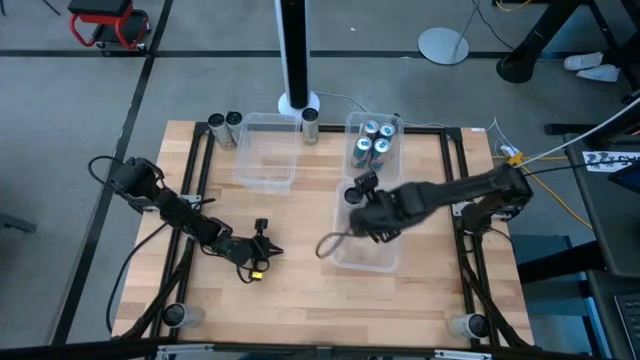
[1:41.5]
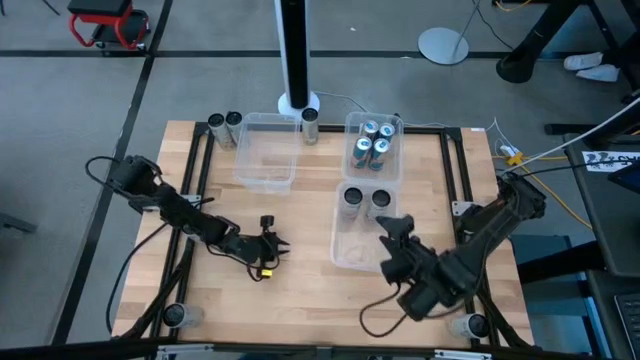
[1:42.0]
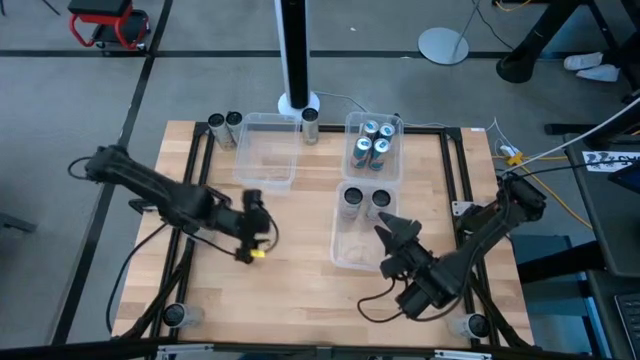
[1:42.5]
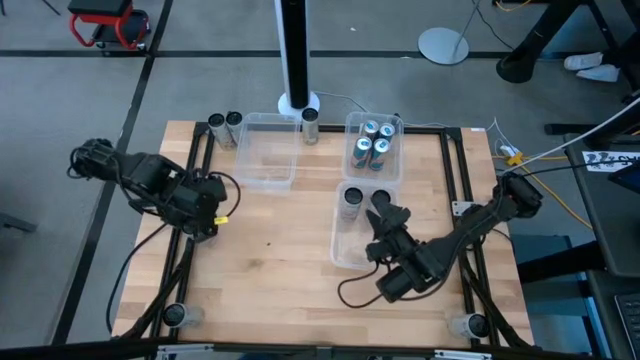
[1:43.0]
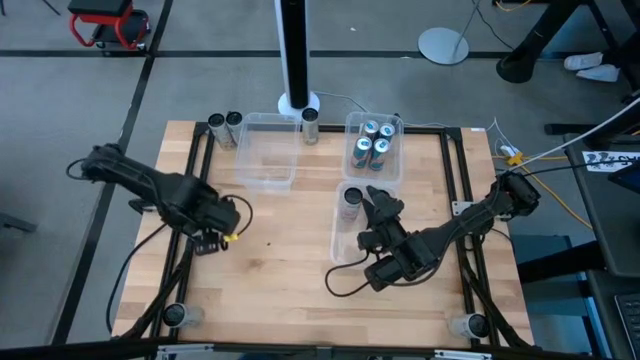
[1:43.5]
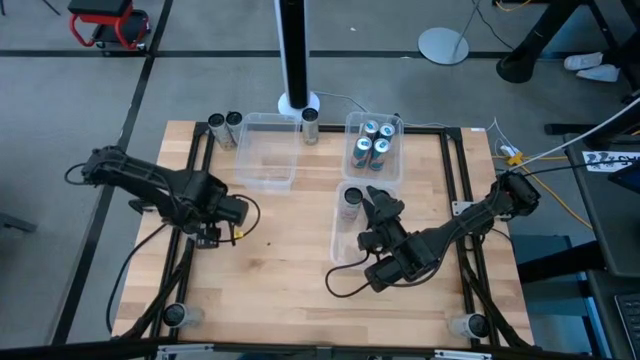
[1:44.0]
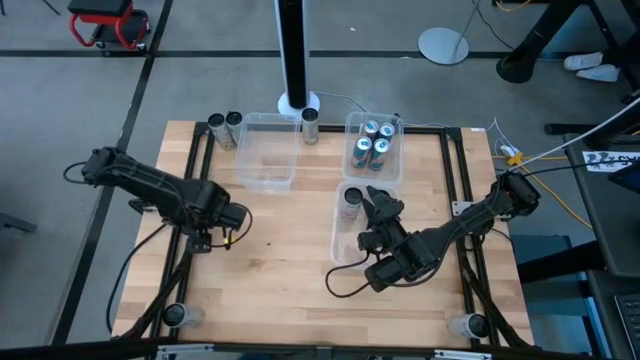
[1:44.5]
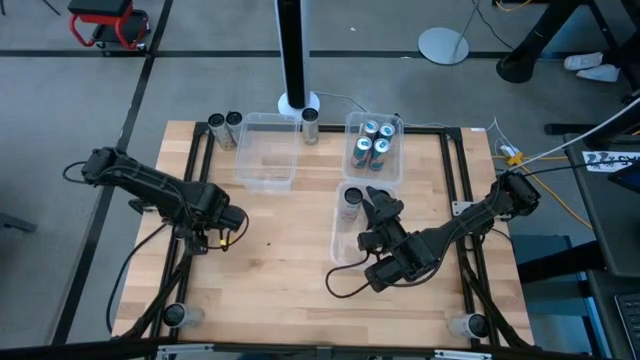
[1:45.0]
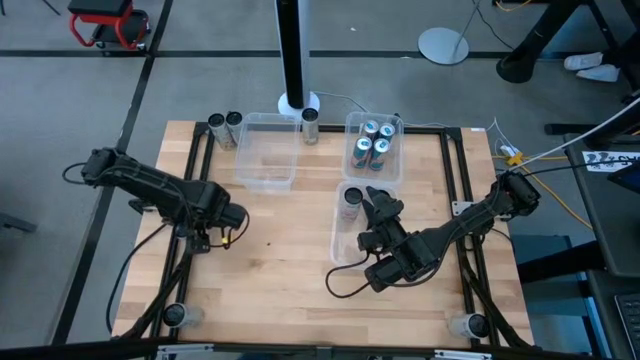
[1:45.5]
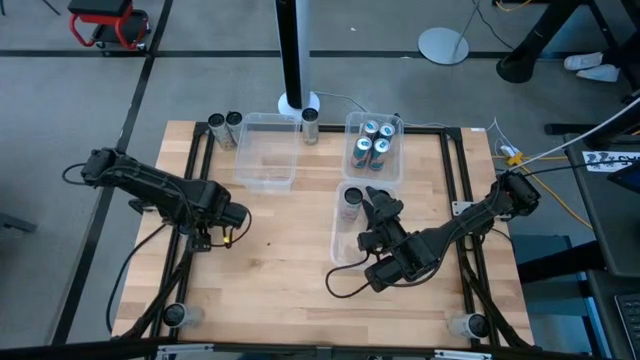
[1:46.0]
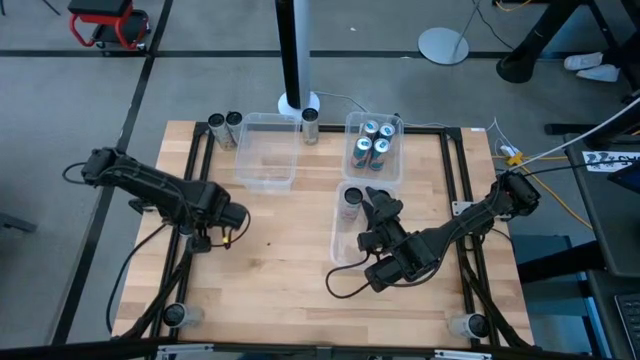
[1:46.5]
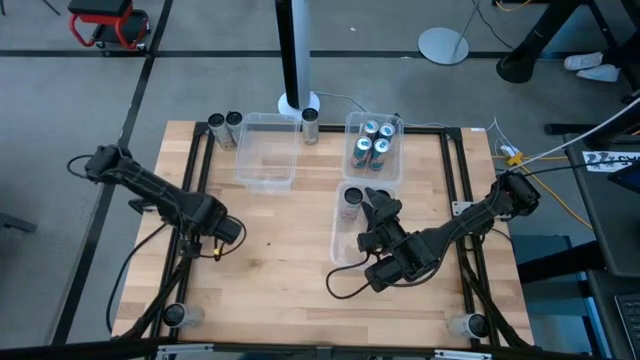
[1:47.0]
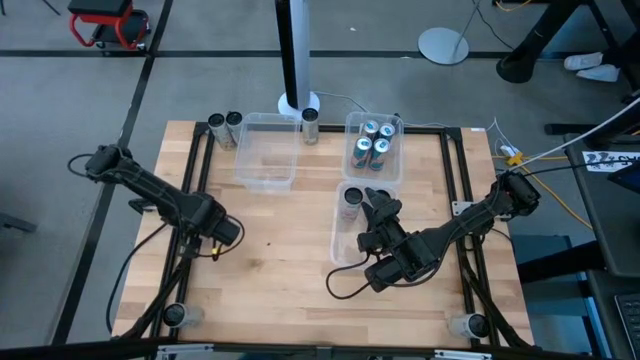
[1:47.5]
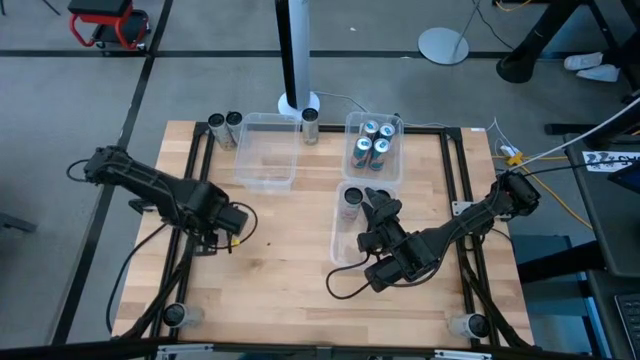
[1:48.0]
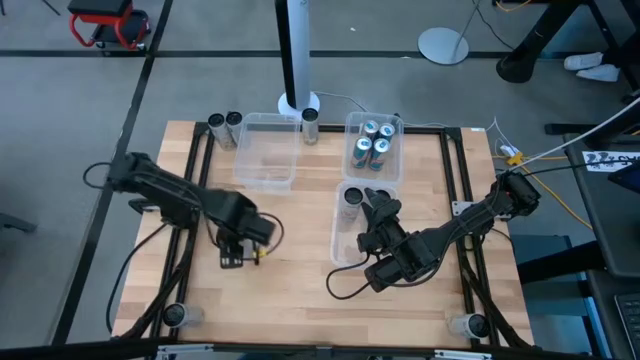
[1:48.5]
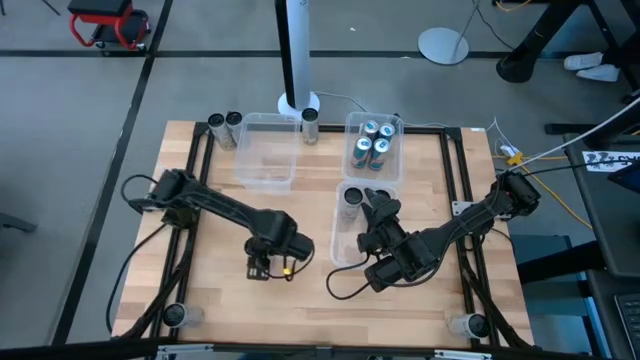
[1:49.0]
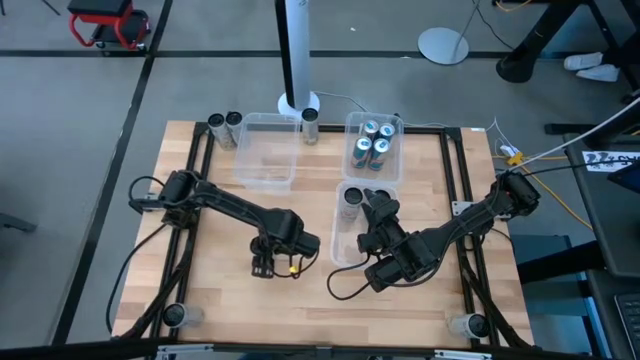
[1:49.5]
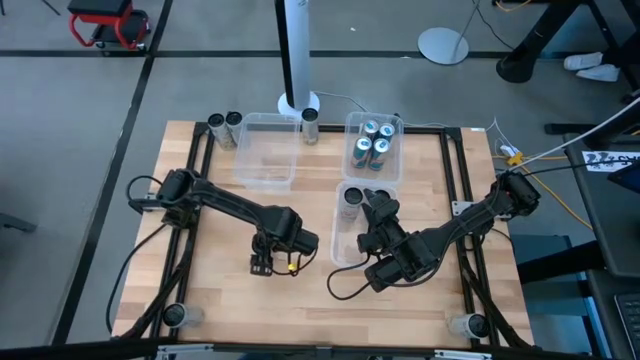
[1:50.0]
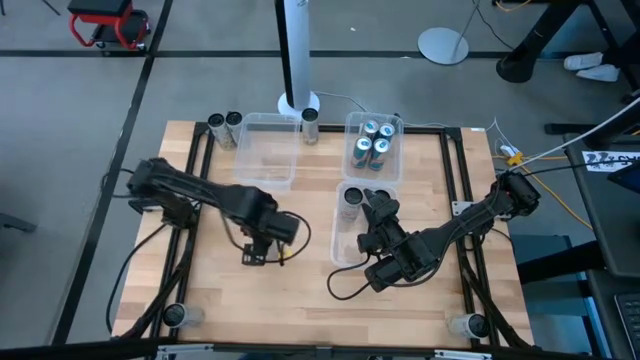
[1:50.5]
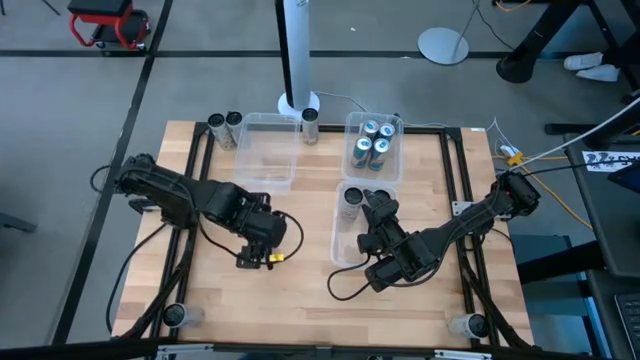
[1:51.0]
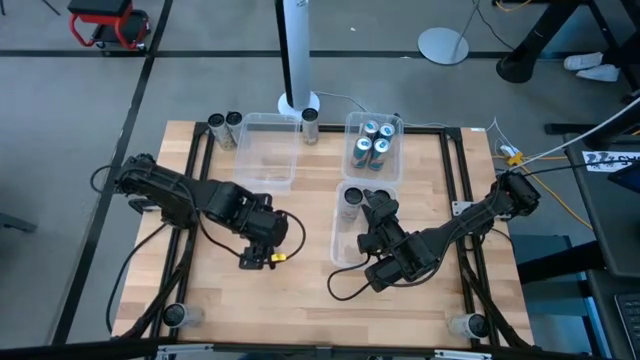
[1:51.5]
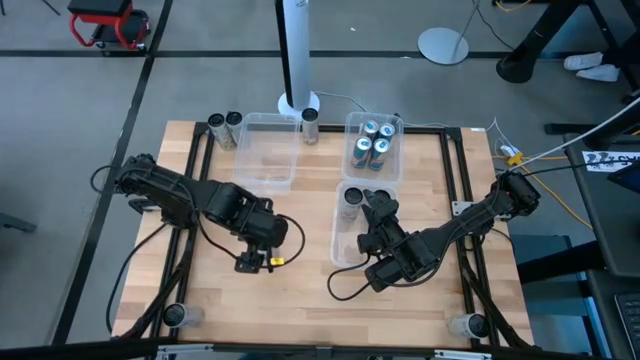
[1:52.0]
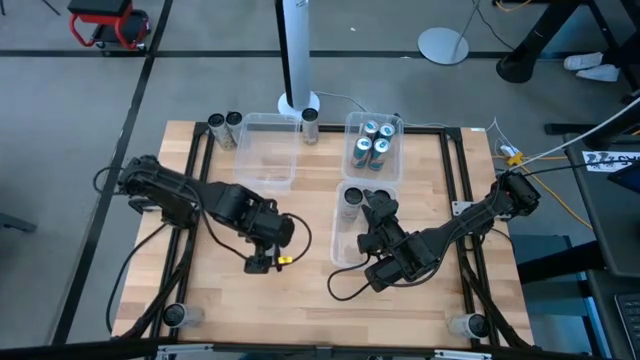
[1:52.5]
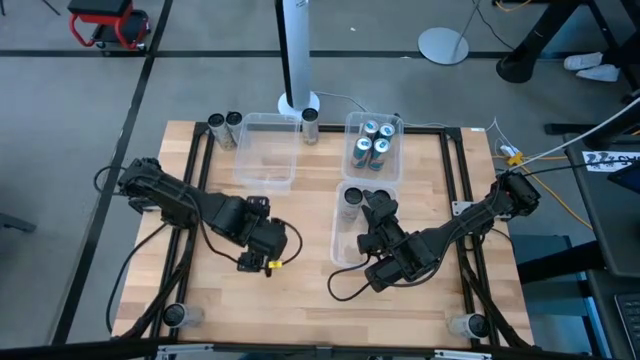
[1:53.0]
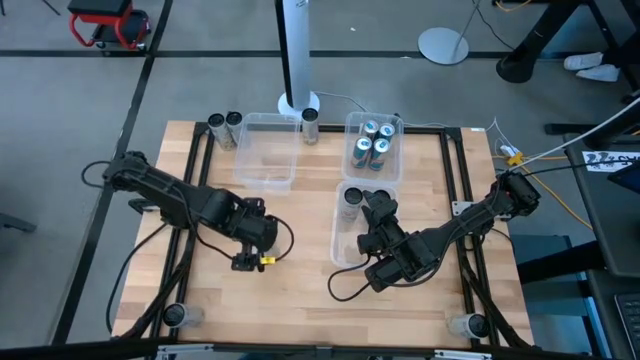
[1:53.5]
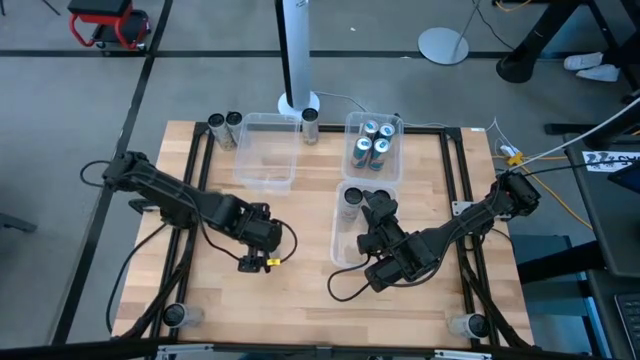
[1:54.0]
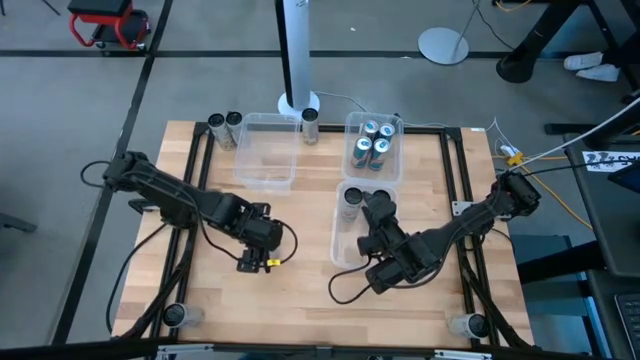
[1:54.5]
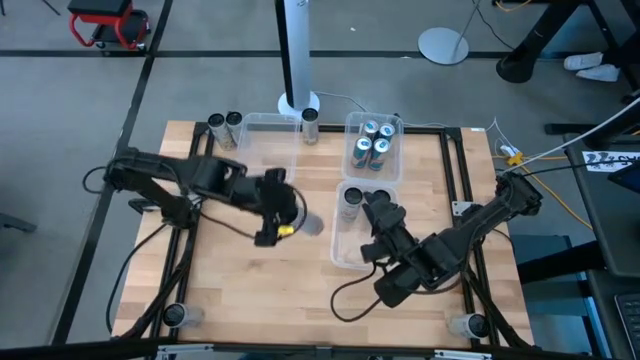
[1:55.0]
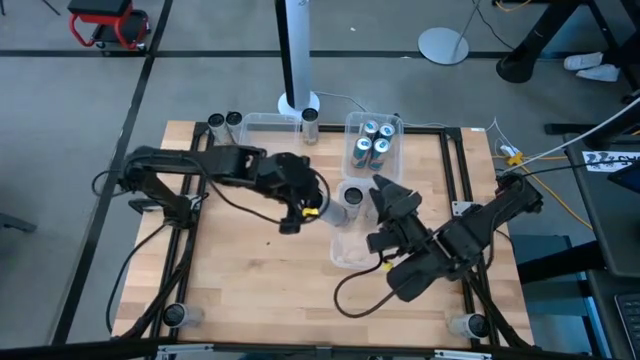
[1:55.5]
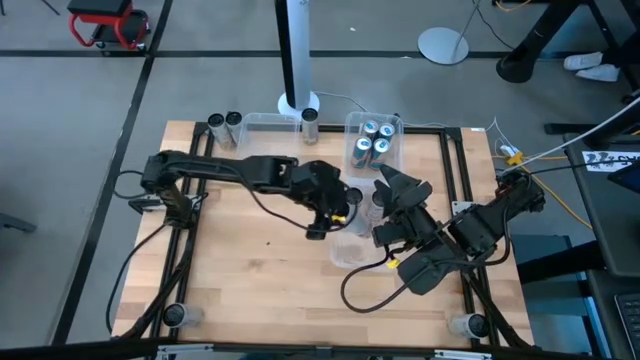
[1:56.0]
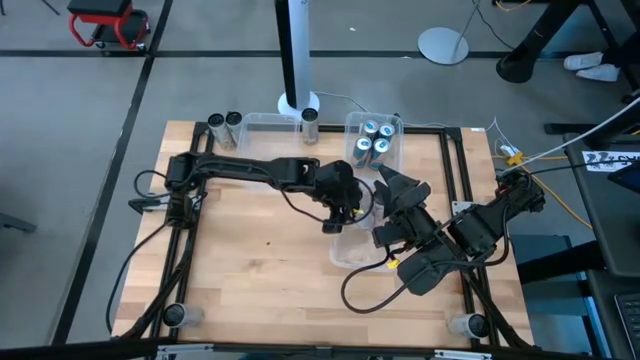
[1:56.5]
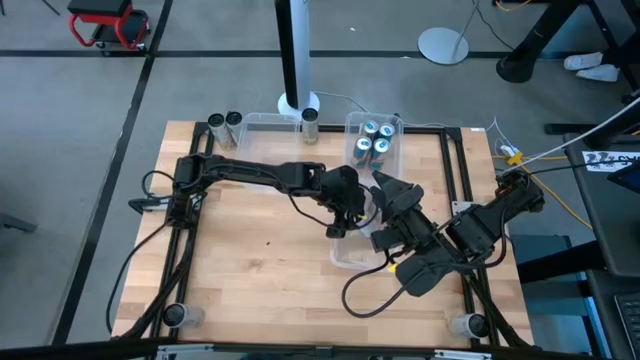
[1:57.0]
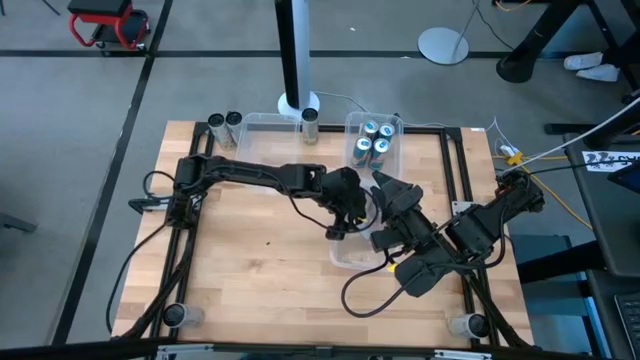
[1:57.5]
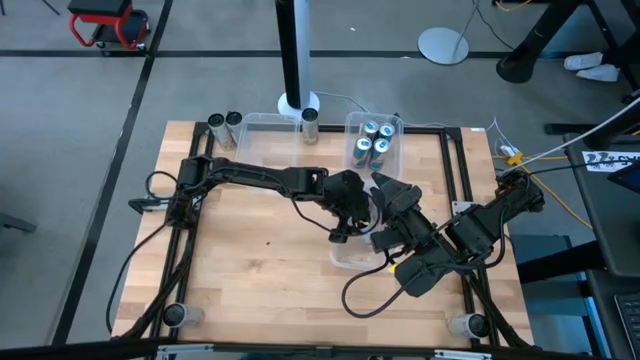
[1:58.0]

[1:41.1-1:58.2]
Task: Sort soda cans
Put the white pink soda can into the bottom right transparent bin

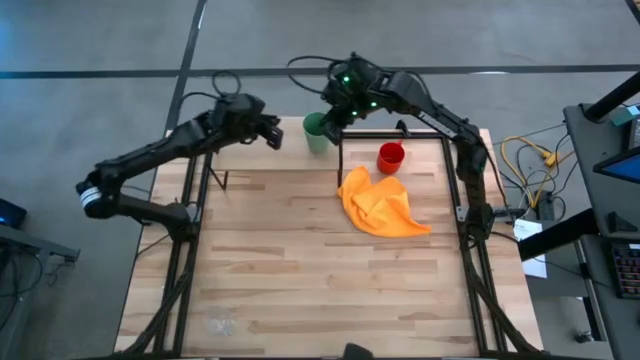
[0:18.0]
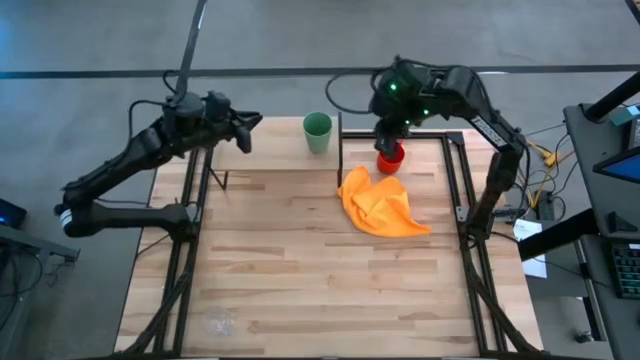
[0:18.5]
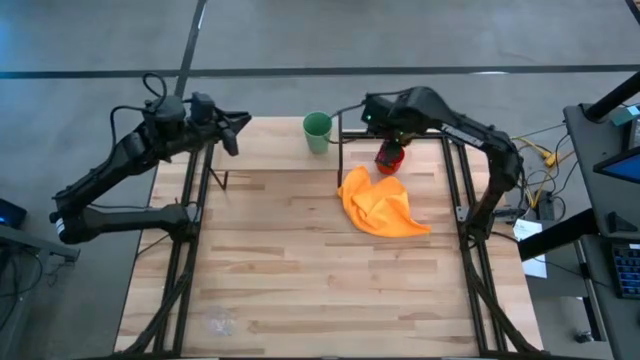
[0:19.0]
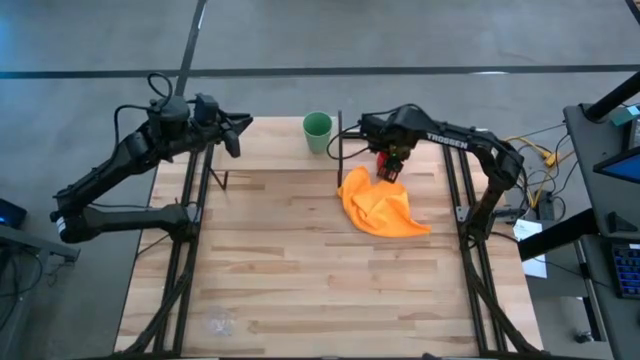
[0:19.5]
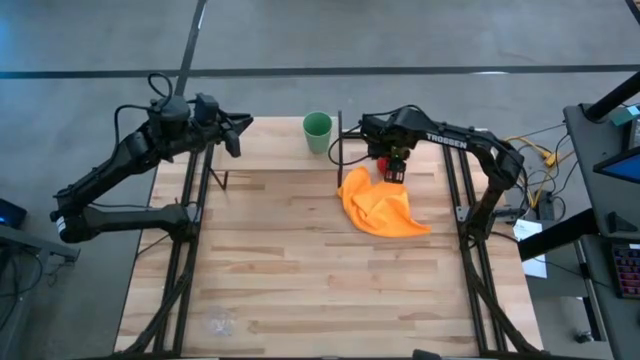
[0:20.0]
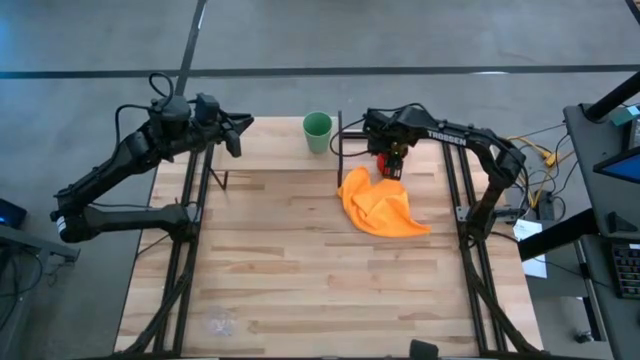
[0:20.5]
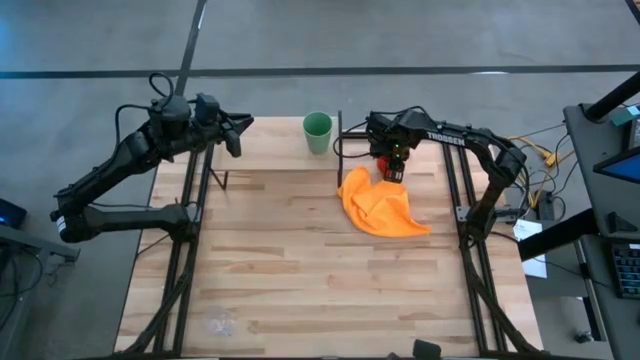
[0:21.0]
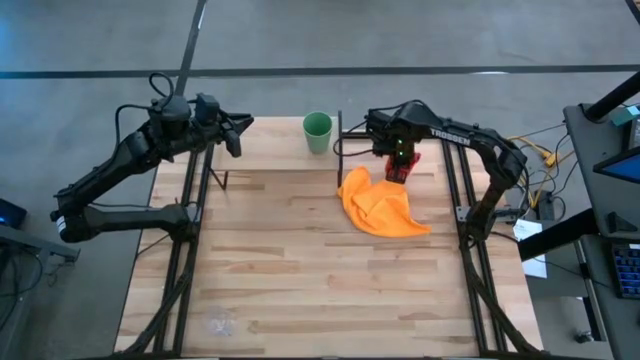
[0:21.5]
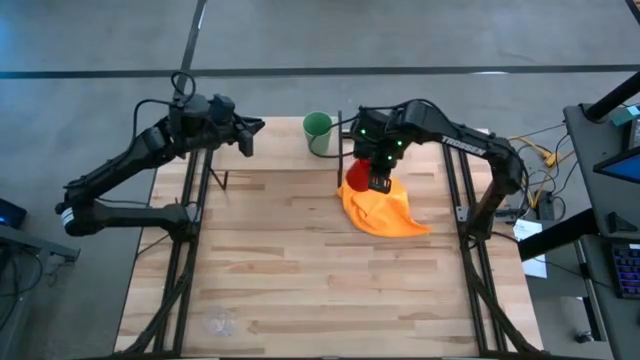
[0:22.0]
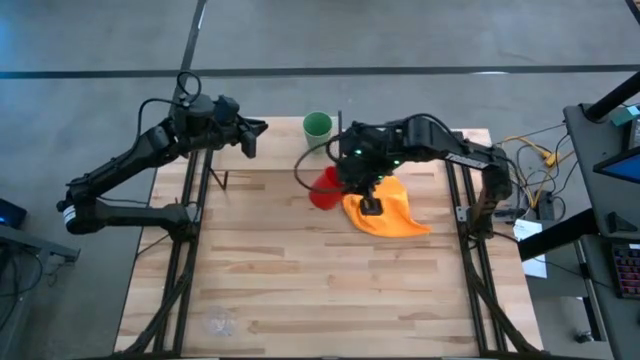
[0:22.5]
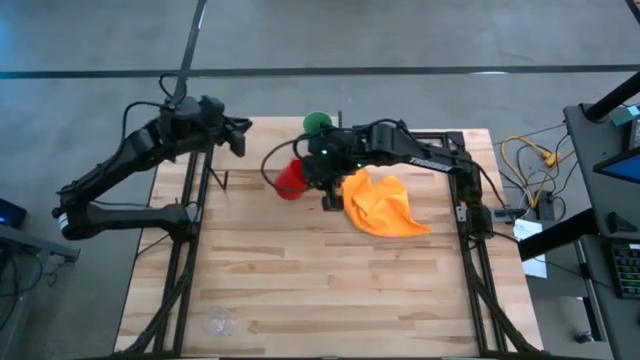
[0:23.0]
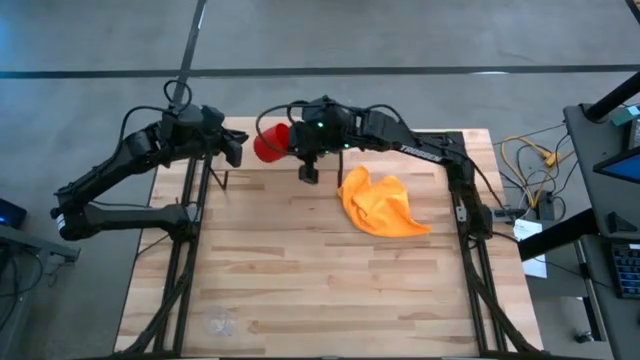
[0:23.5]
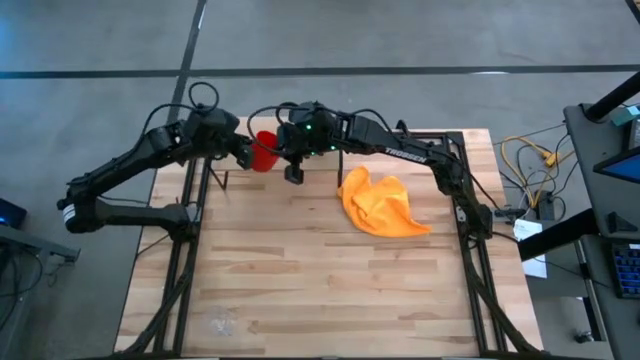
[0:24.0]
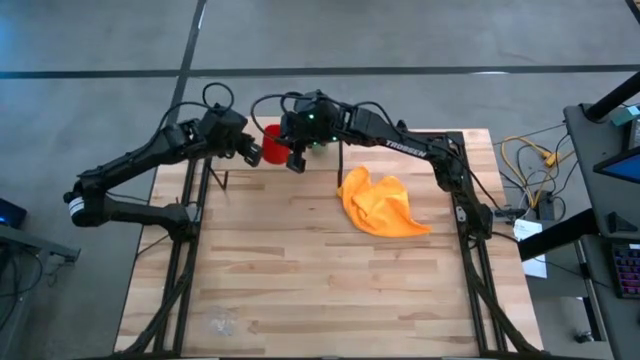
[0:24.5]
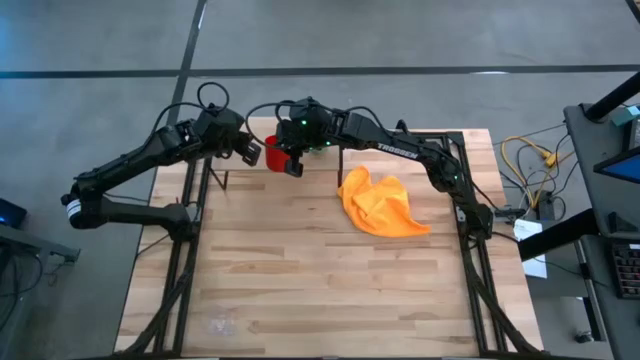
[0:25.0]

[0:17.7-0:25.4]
Task: Stack small to large cups/mugs on shelf
Put the red mug on the shelf
